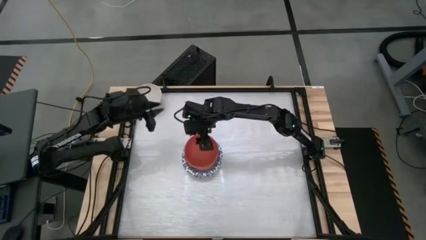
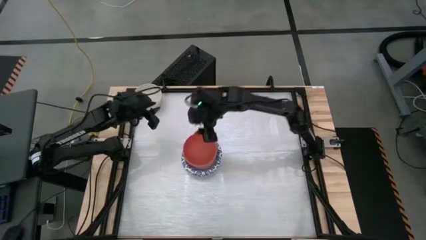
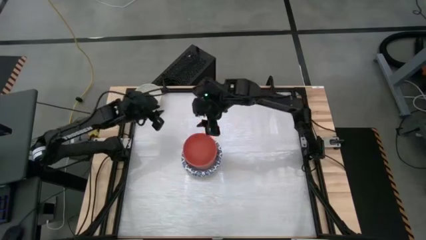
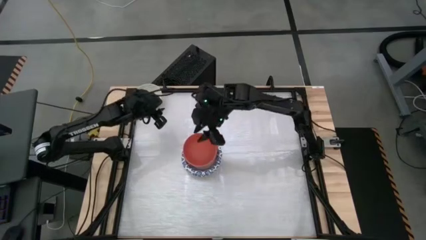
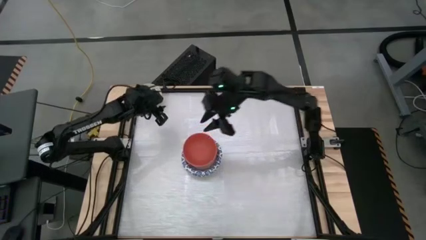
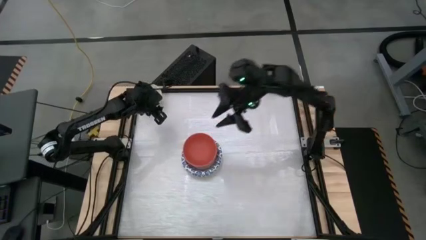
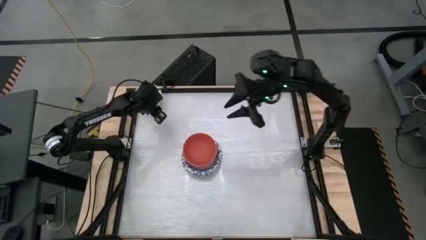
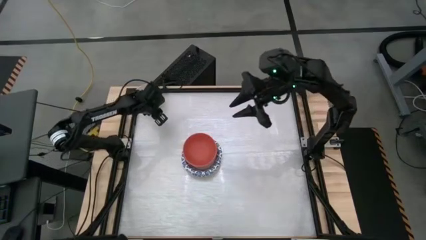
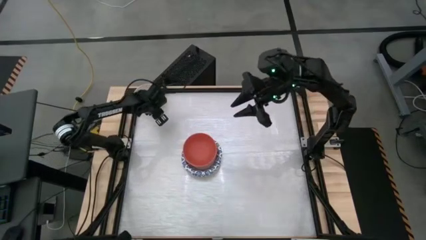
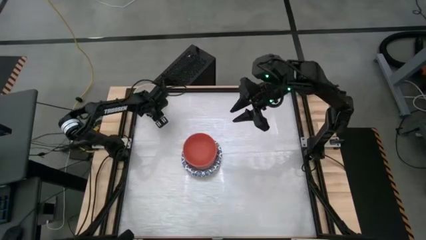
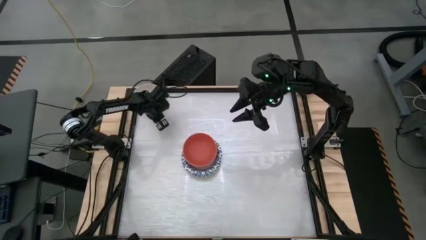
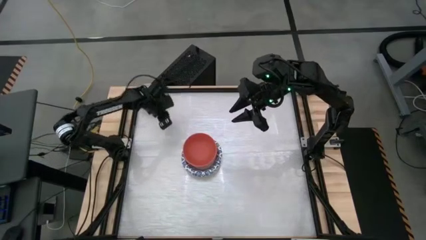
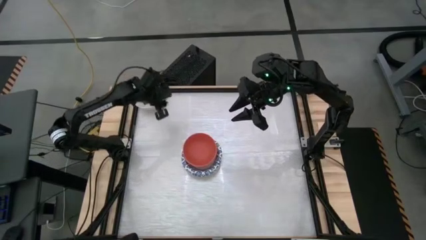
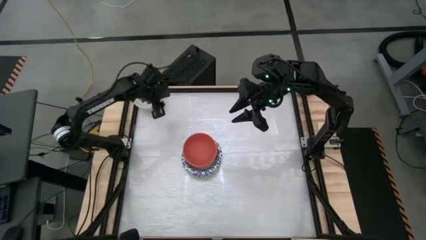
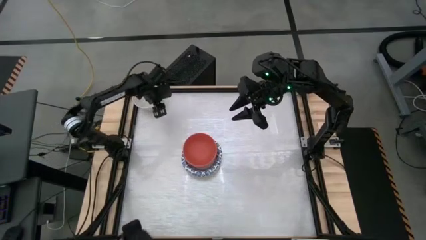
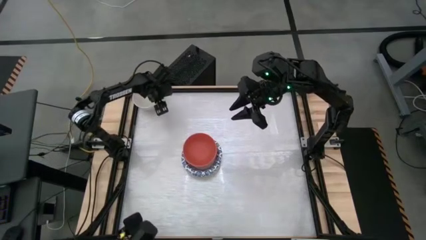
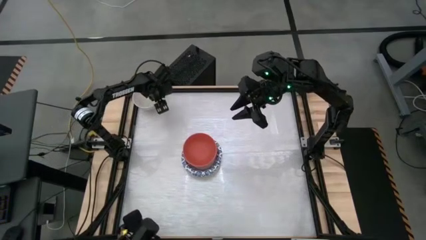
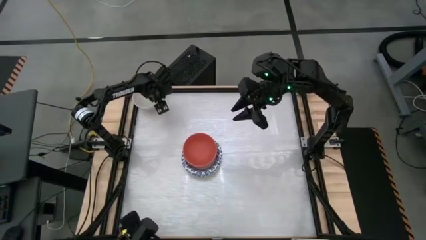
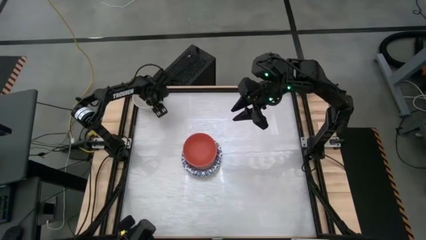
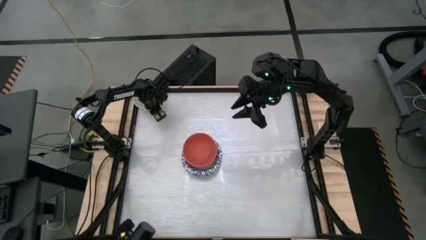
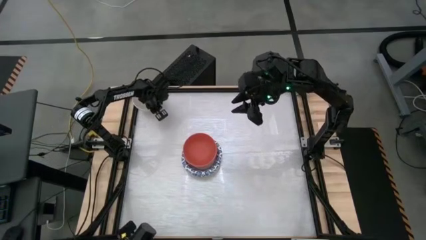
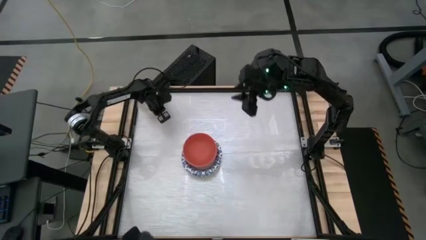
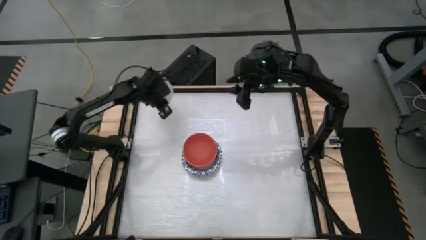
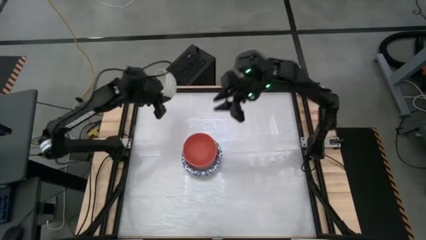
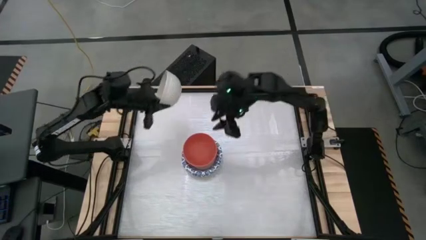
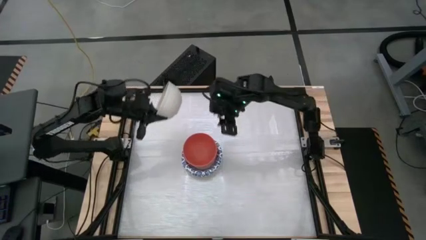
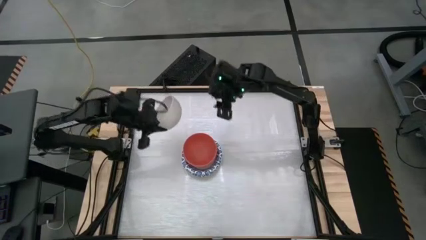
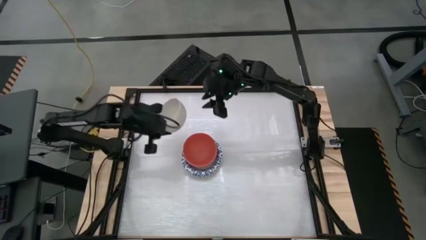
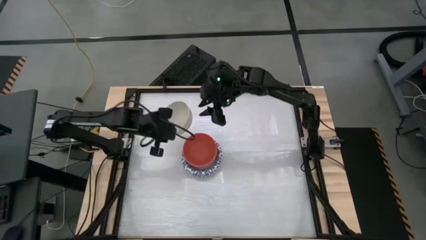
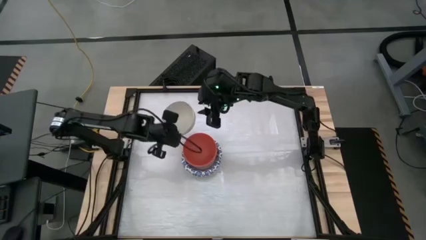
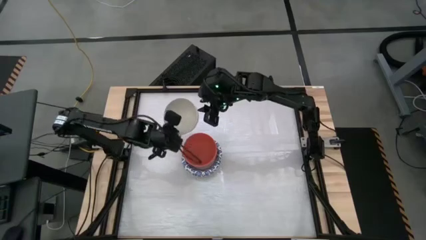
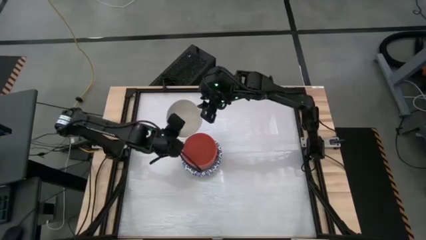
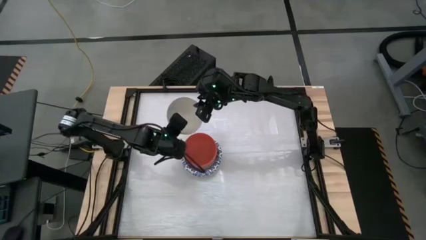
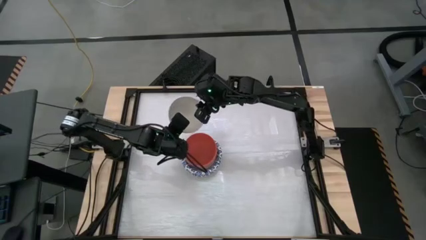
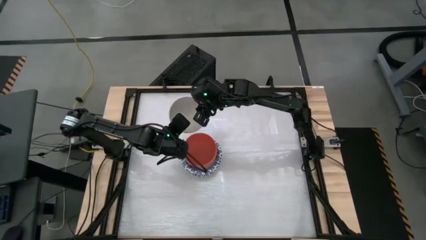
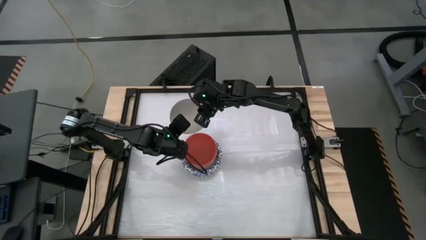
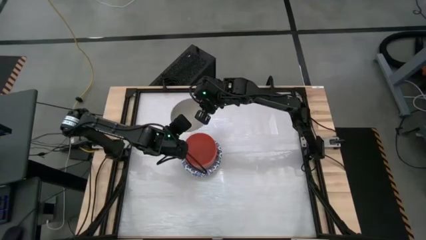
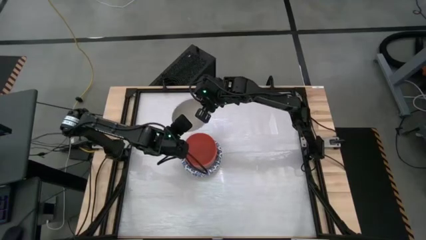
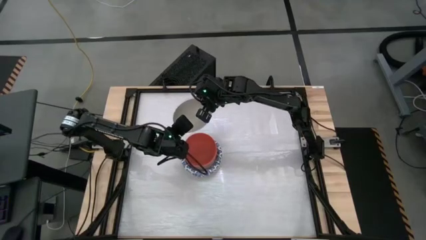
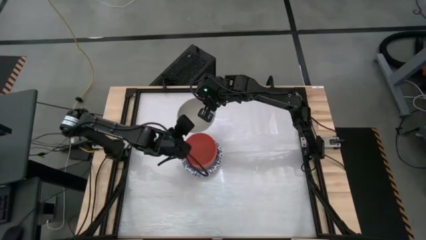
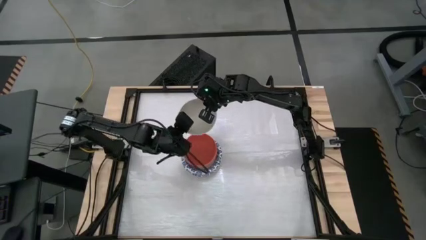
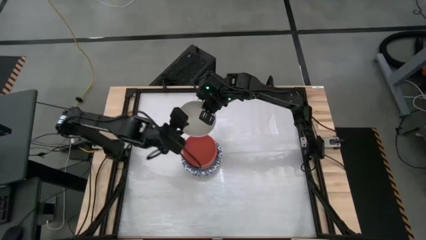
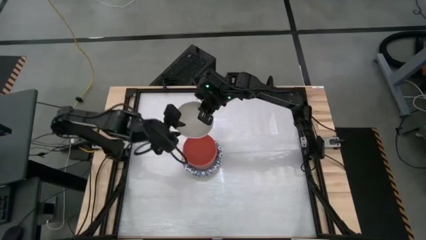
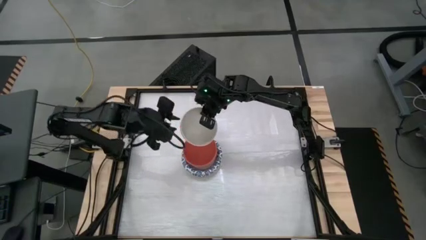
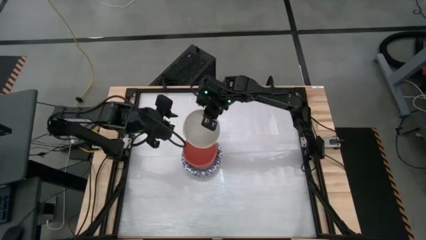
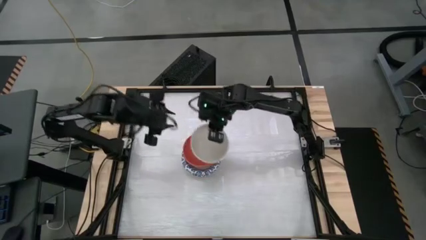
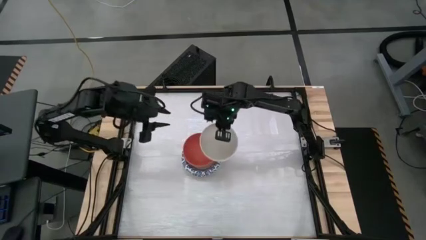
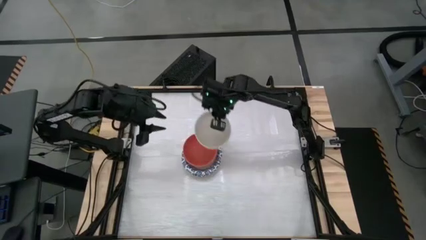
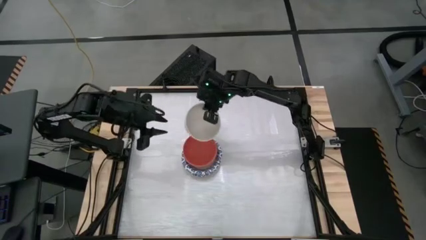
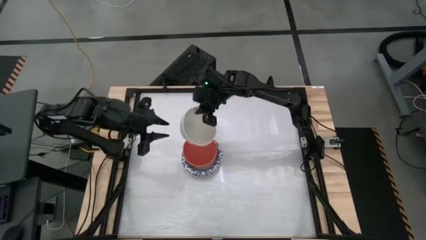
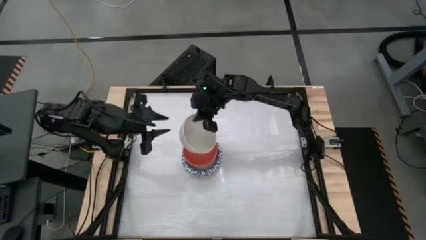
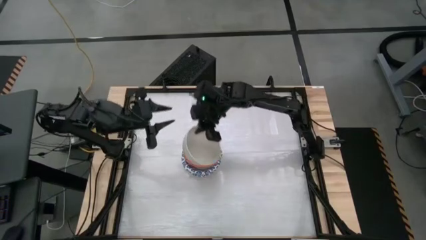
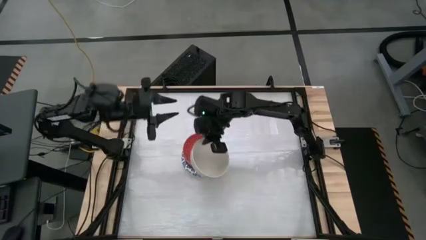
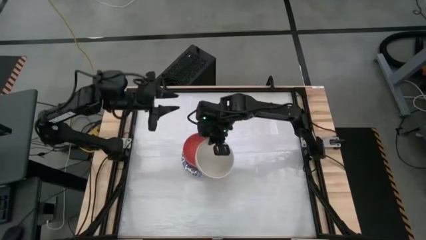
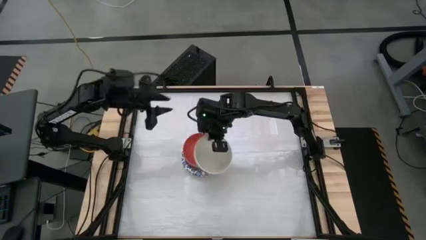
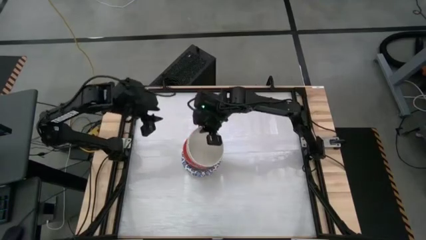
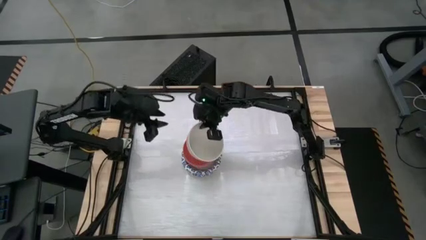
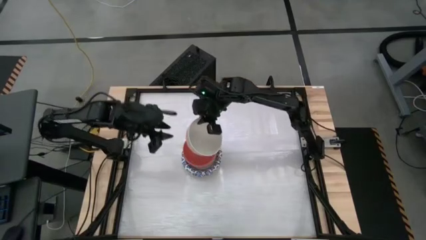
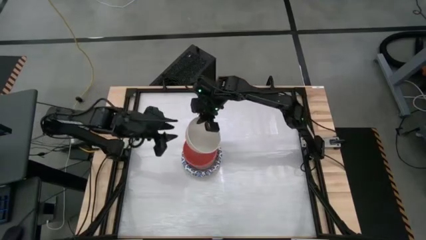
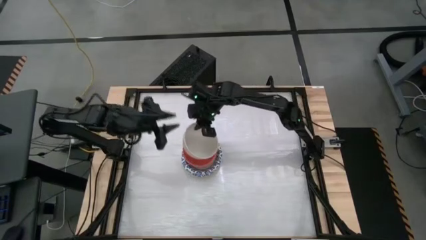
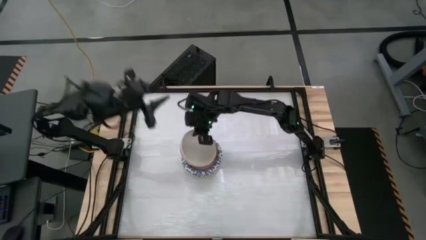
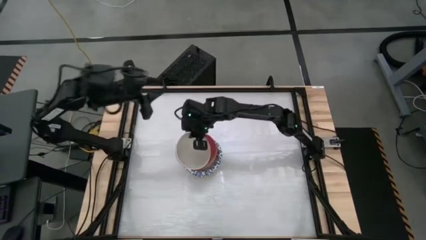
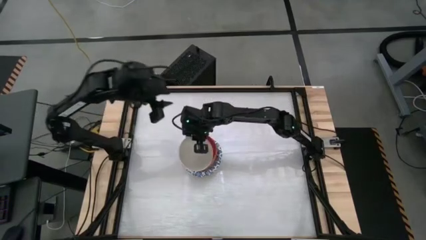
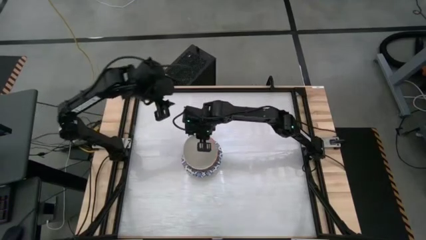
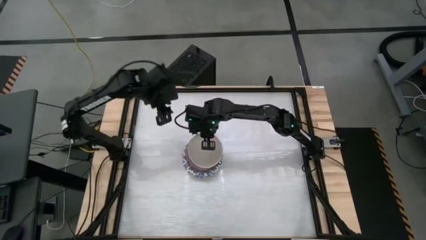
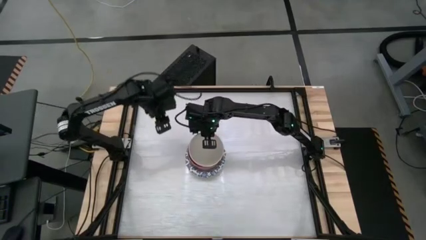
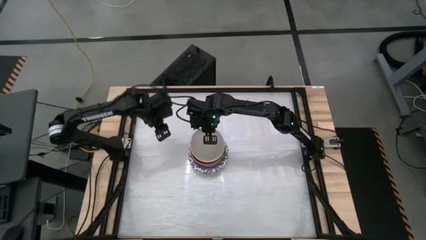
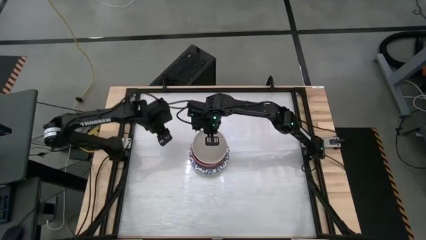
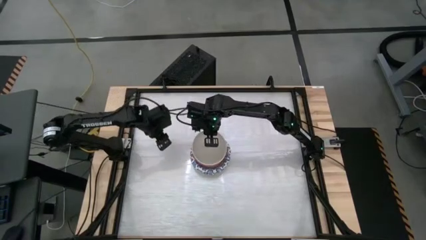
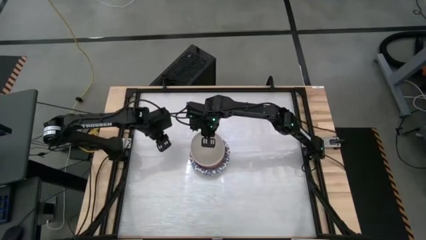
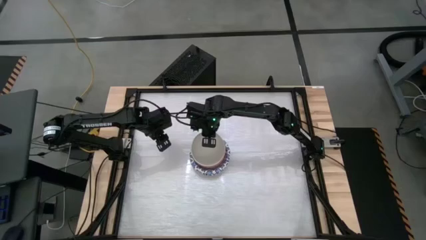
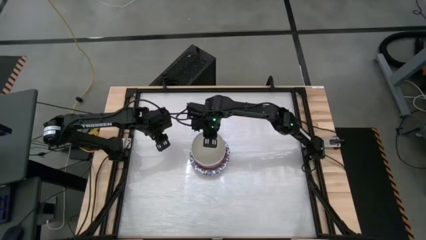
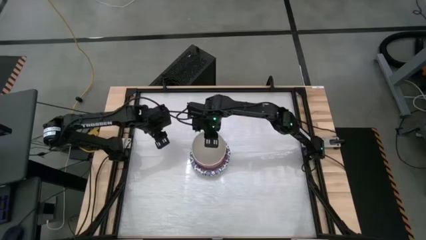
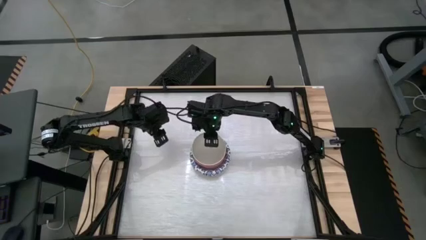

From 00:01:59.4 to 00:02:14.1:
Task: Nest bowls inside each other by size order
Stack the white bowl on top of the orange bowl

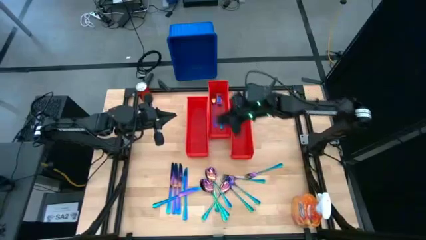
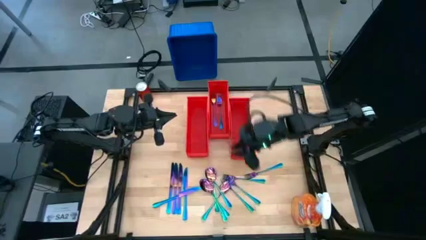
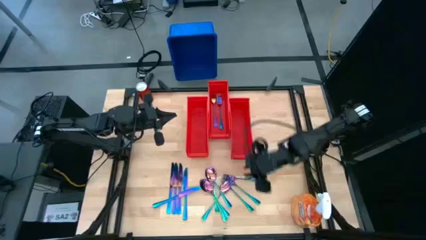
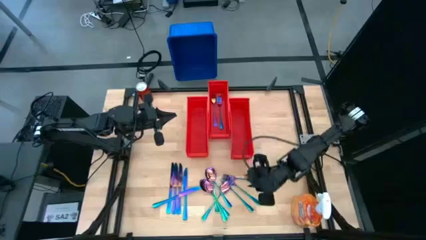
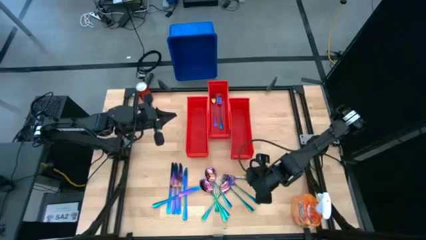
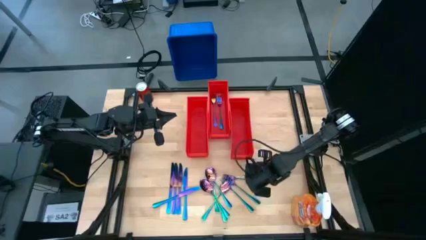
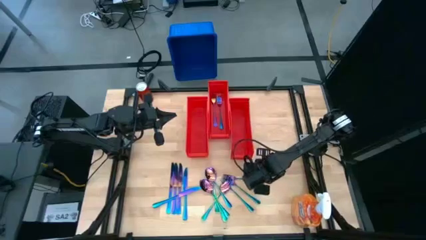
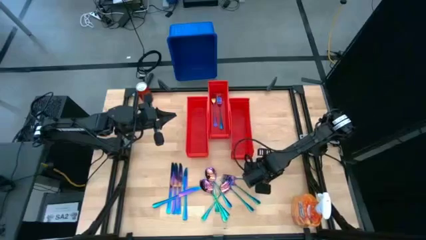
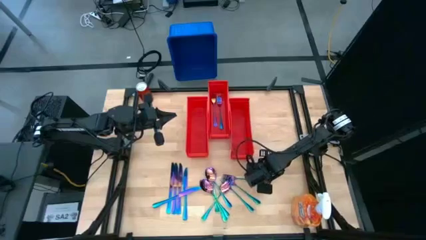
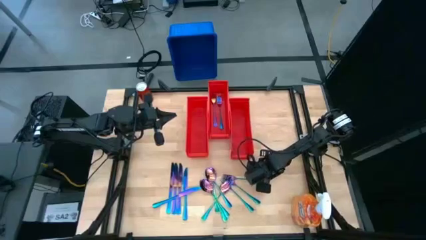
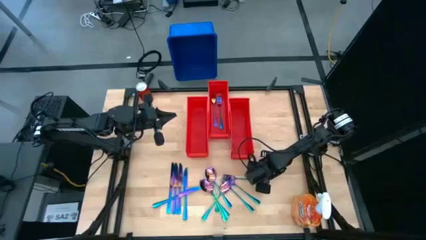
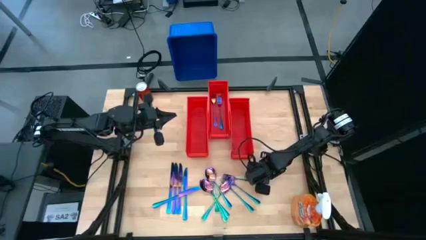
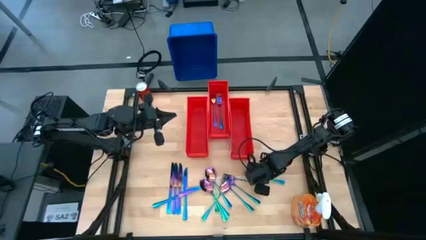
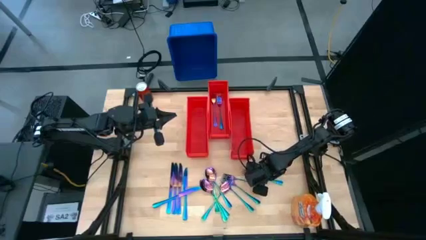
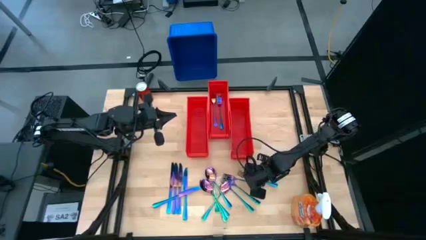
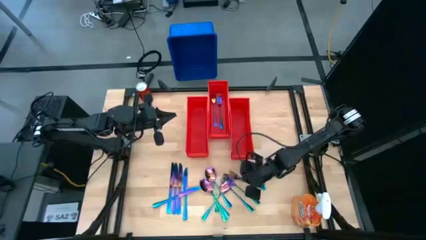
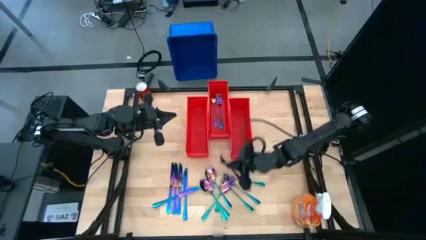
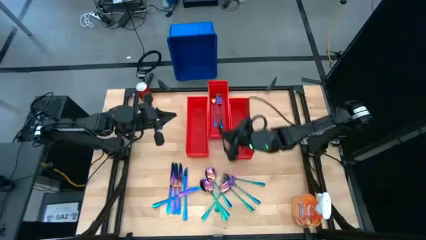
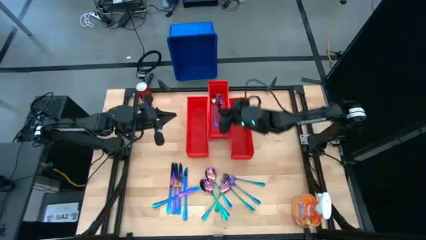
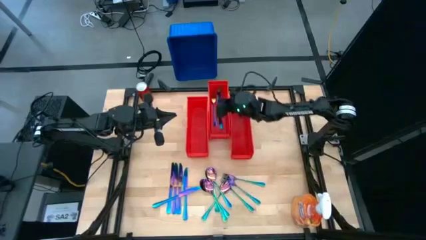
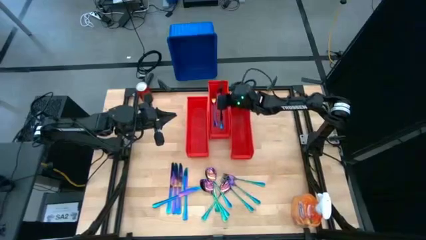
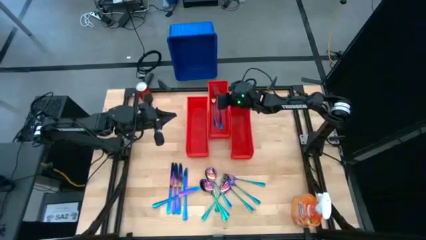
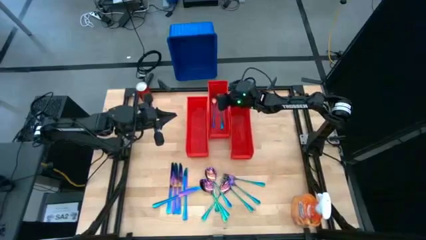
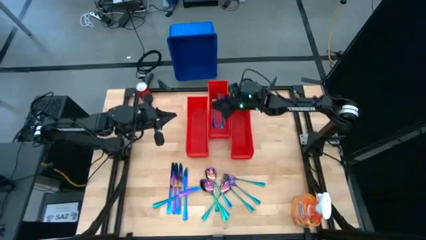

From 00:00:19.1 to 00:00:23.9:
Task: Sort silverware
Put the iridescent fork into the middle orange bin
